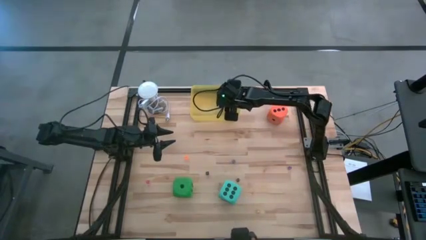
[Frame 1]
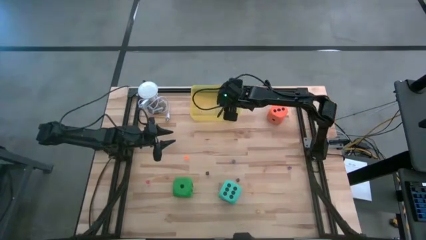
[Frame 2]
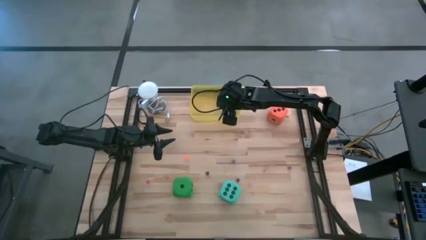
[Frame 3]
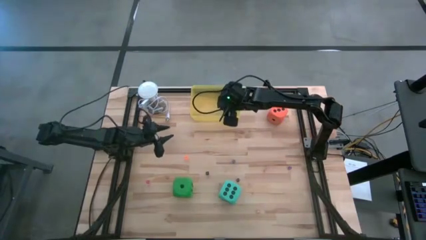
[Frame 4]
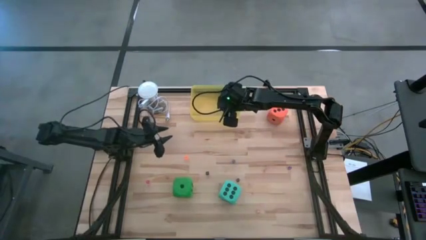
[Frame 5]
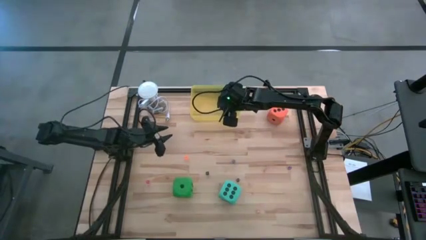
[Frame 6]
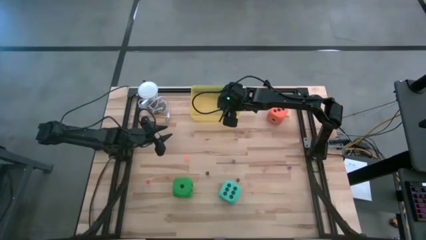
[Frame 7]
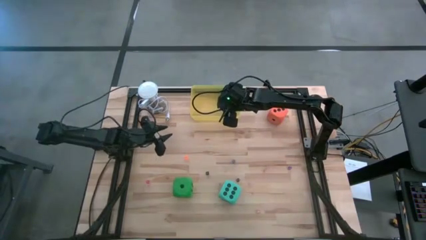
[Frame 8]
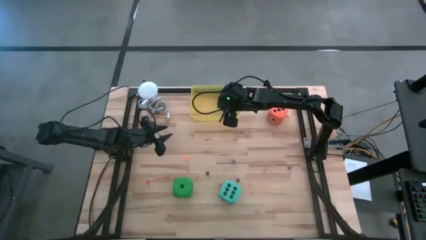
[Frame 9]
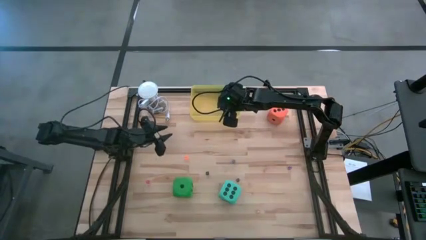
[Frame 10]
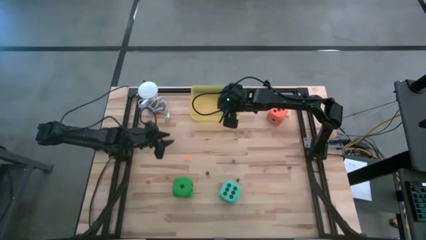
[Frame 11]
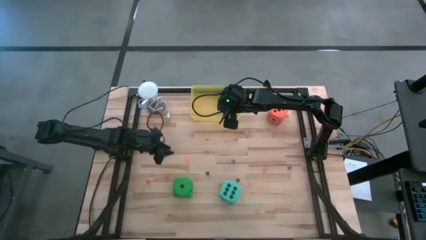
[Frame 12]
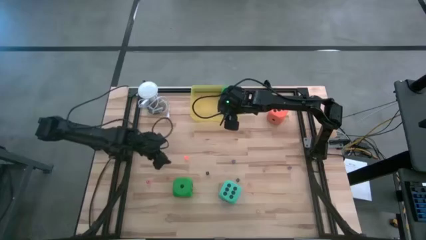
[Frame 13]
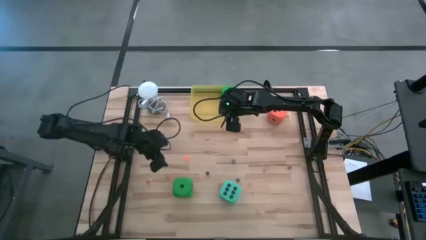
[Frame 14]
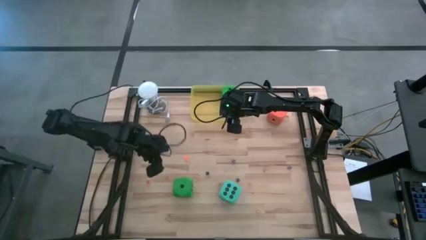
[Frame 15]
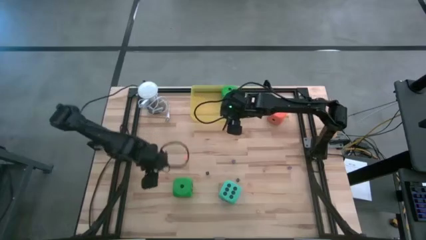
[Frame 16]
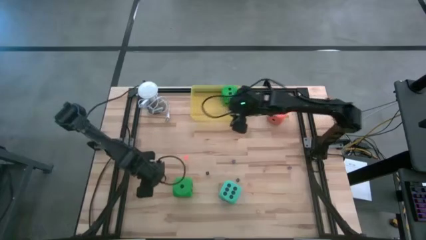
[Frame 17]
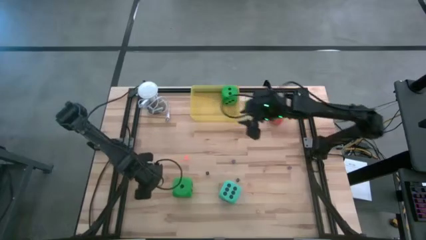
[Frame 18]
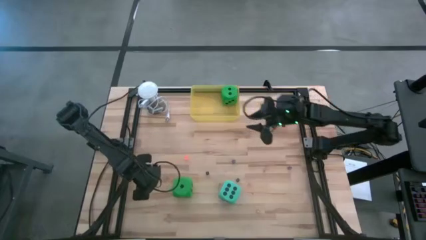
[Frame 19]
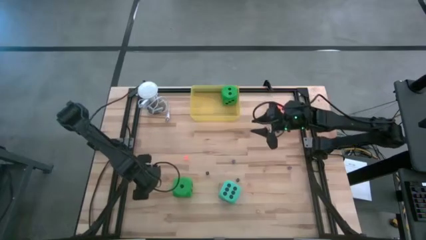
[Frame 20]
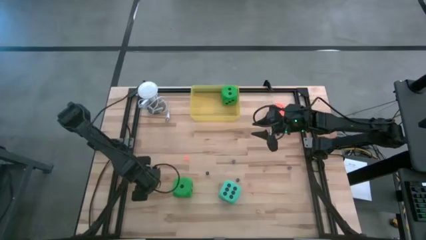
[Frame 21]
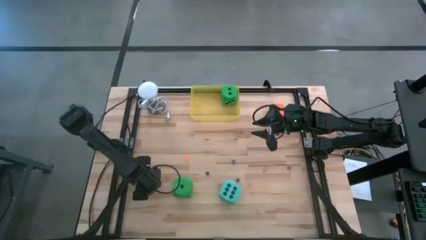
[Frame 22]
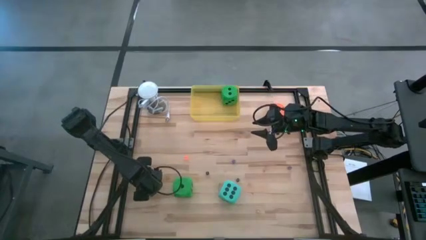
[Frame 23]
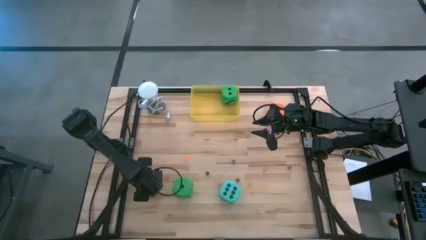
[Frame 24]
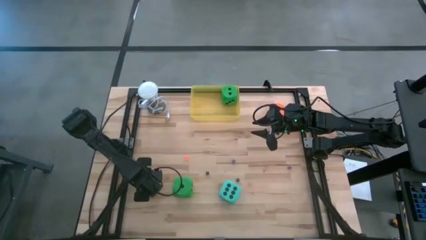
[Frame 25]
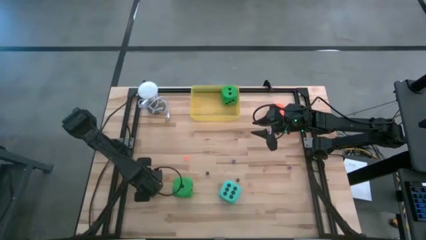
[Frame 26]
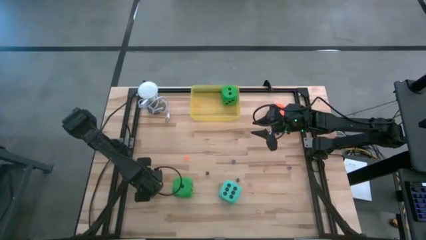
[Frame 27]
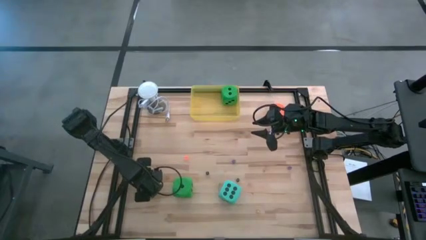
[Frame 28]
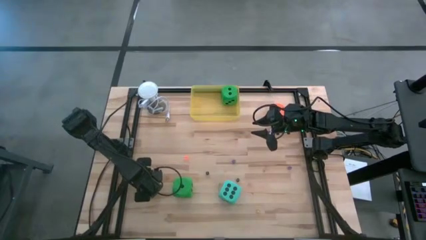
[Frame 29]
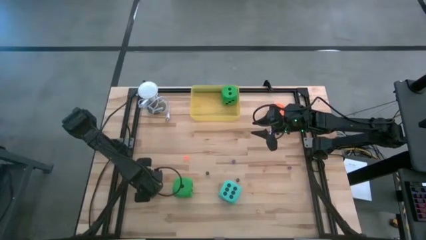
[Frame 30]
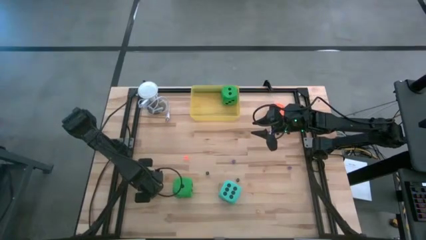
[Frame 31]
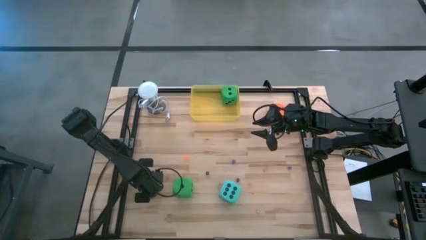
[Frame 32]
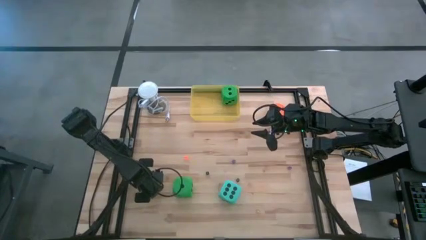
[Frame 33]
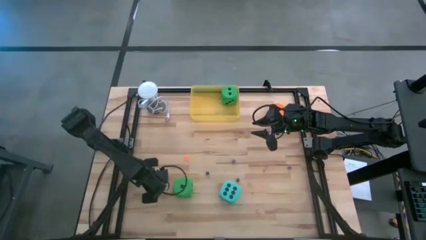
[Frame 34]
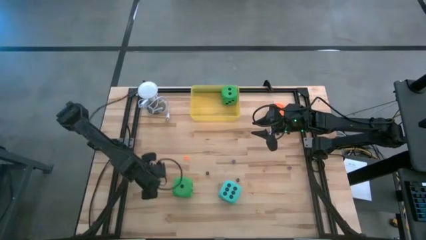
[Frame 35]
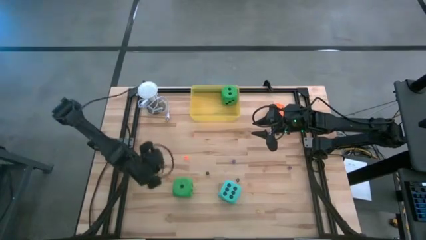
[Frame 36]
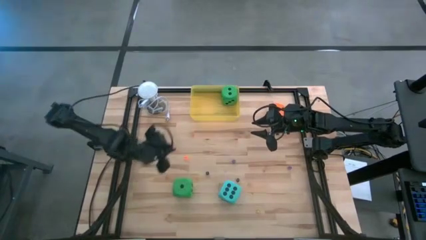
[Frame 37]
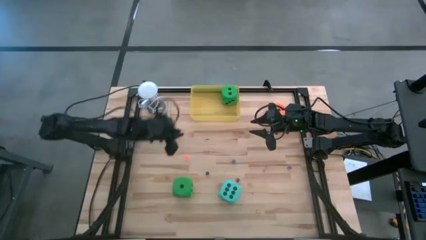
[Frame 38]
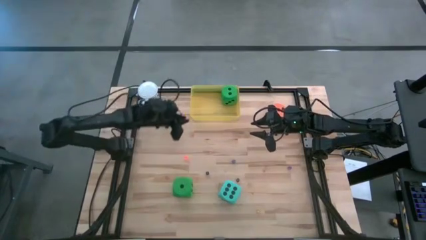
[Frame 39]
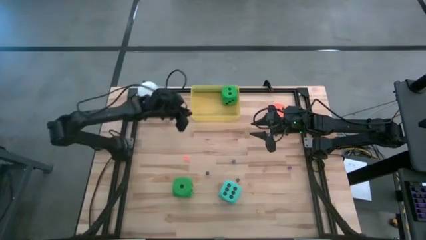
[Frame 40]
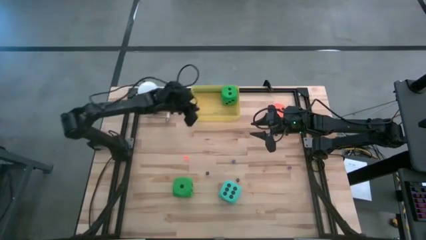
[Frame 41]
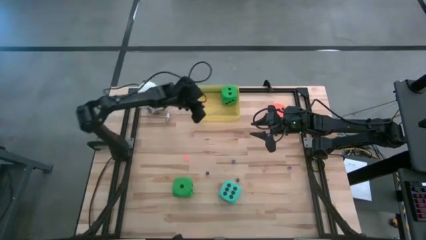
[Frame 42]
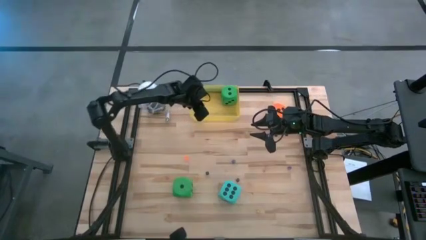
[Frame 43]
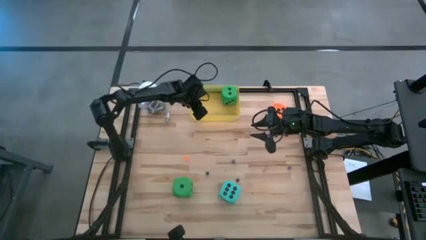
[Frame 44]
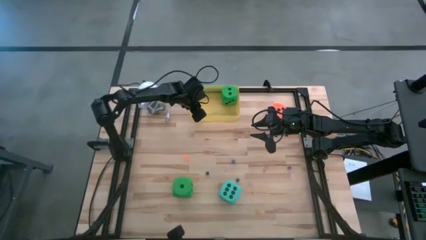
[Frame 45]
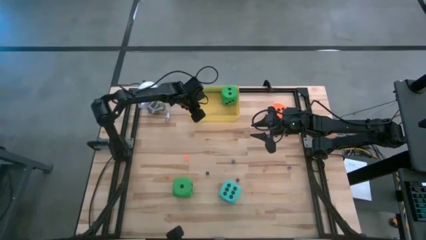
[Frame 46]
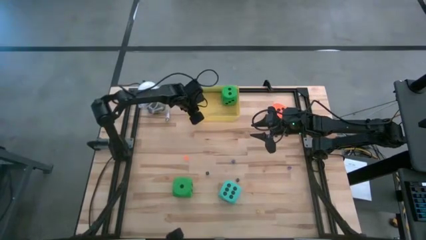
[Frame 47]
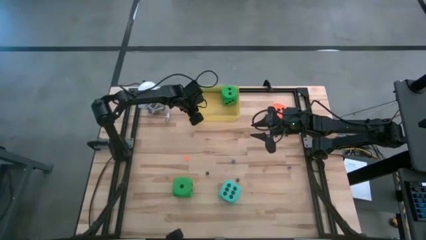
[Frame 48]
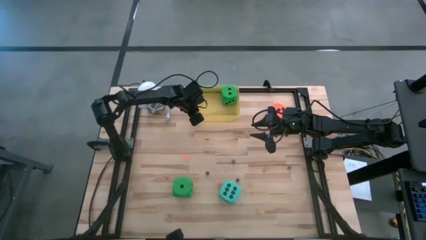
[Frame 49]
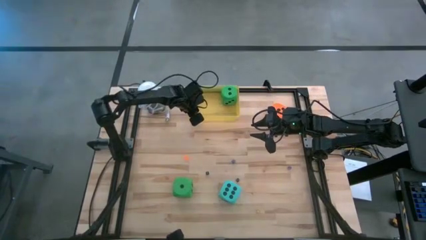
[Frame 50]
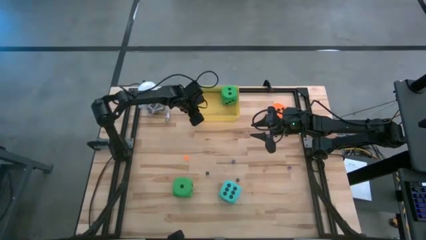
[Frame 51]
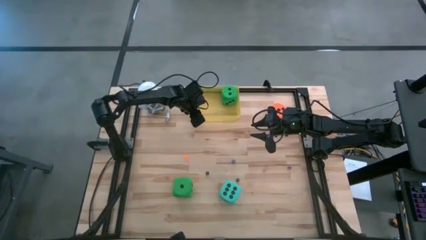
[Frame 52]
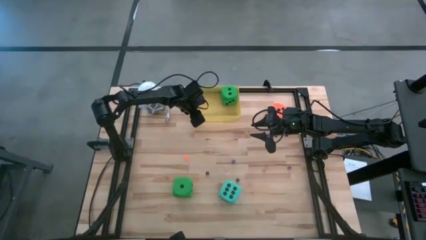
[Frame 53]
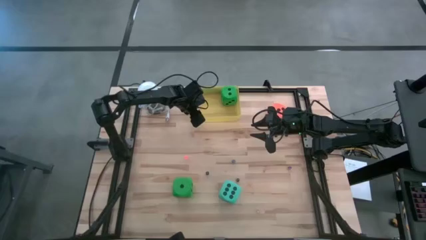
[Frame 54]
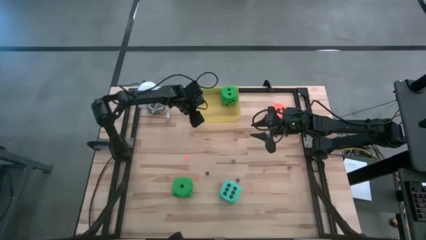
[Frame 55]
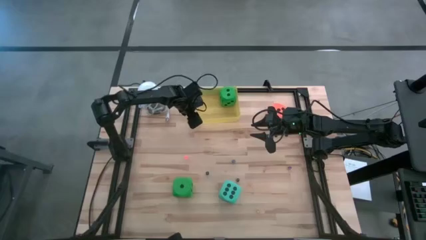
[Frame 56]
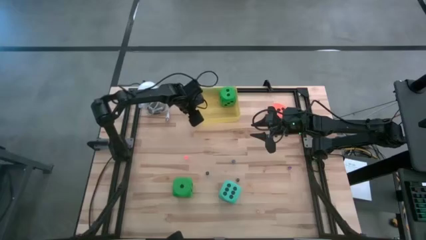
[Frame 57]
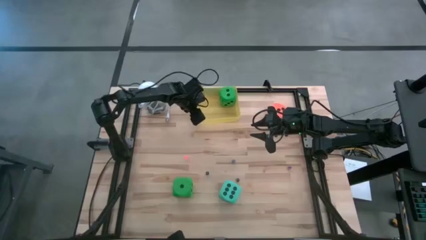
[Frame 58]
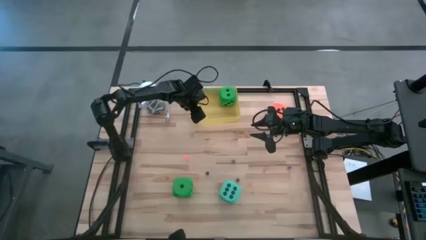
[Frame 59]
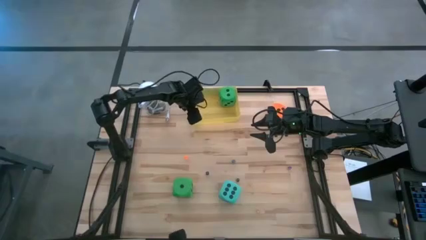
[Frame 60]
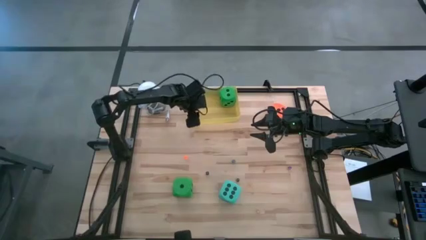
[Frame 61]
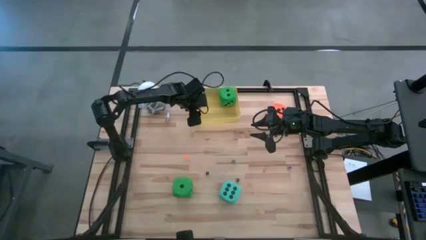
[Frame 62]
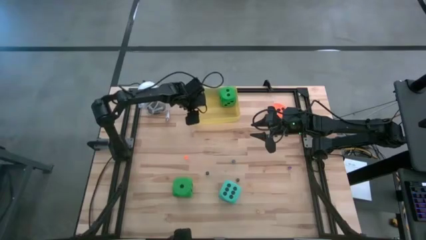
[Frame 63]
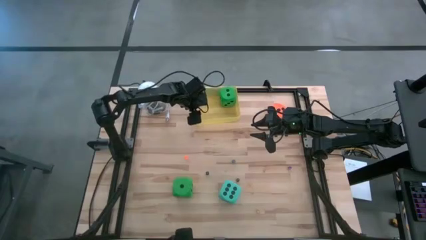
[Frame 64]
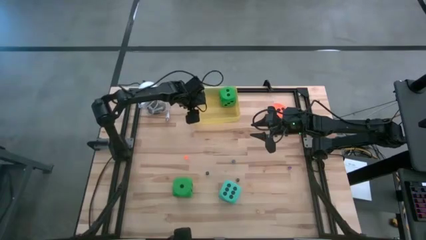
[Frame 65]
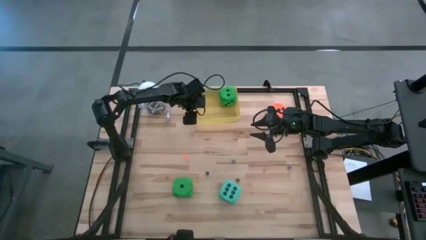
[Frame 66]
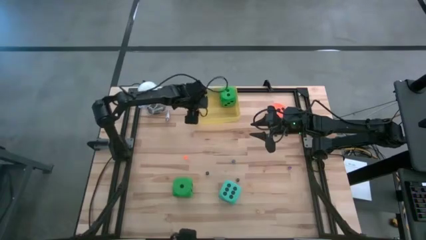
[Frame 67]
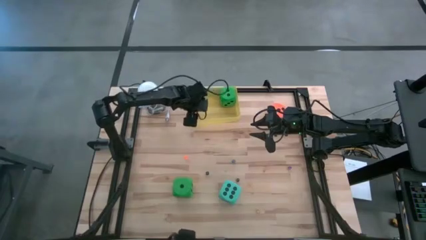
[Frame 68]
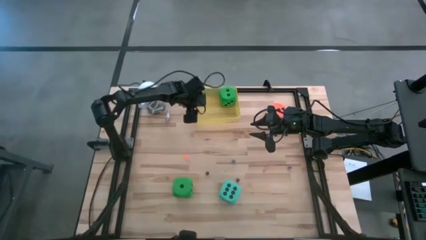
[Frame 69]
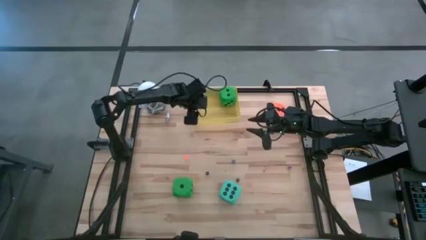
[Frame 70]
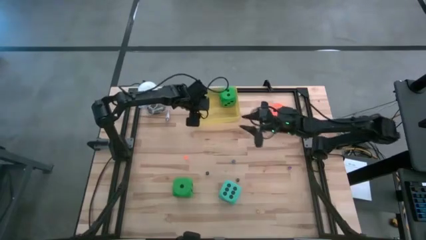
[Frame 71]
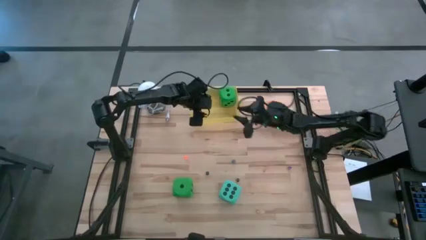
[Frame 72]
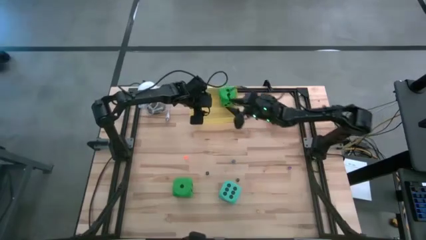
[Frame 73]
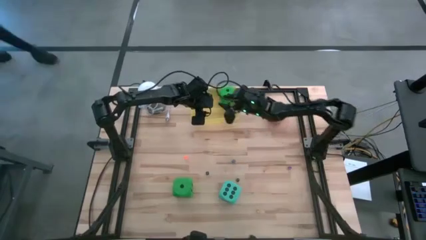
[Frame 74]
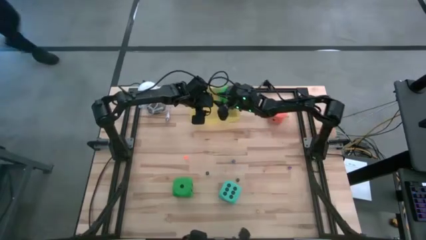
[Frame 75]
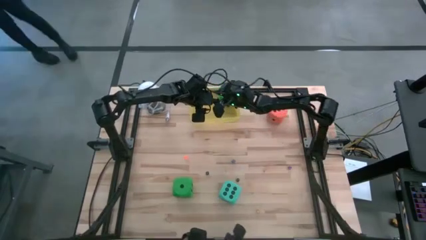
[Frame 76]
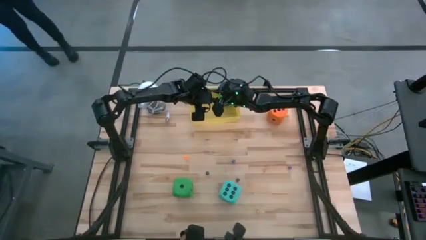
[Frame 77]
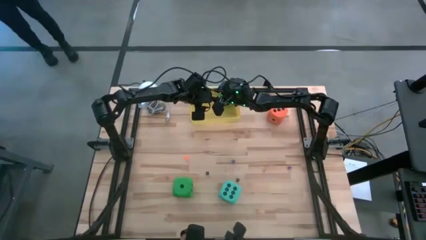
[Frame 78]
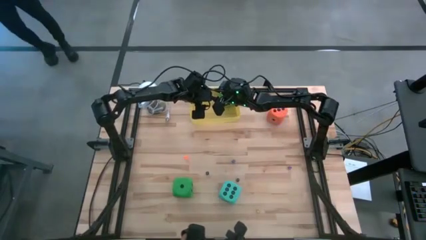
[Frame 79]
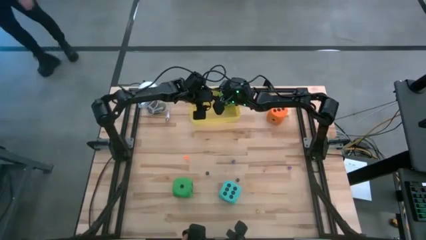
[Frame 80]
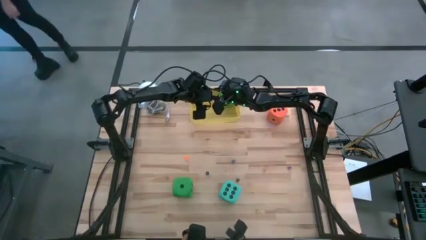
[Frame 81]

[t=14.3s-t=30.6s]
Task: Pick & Place Dice
Put the red small die into the yellow bin
